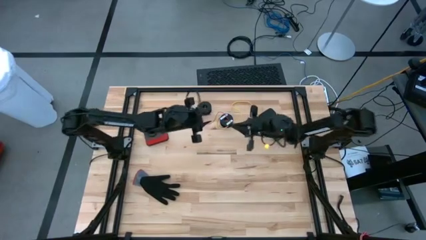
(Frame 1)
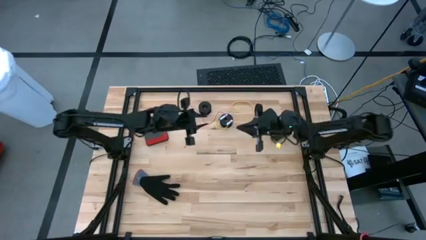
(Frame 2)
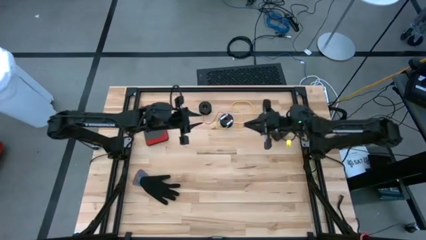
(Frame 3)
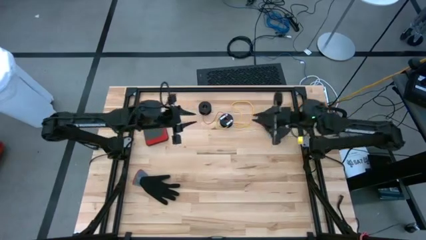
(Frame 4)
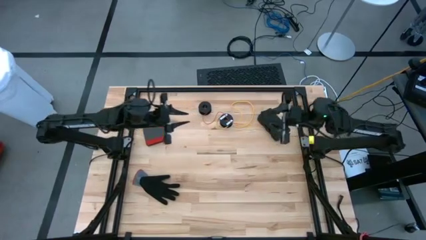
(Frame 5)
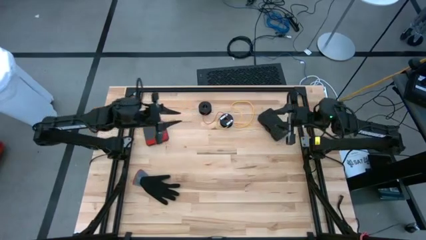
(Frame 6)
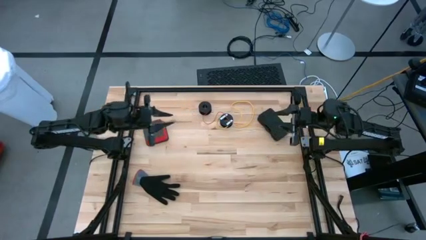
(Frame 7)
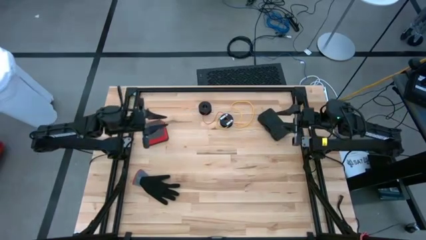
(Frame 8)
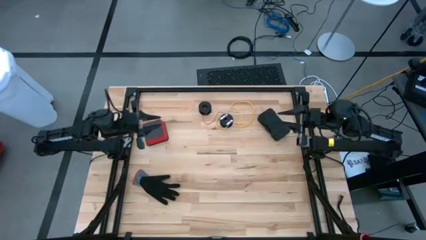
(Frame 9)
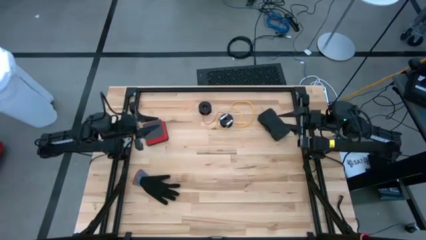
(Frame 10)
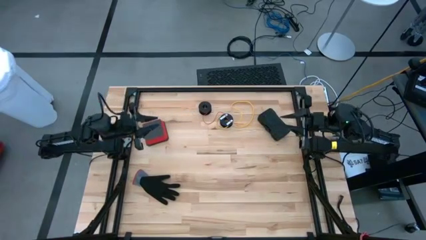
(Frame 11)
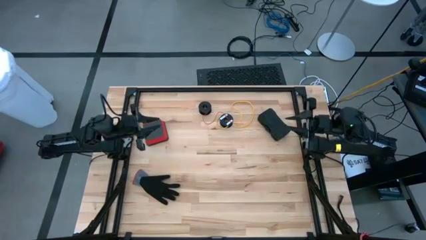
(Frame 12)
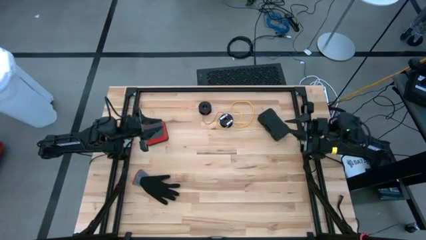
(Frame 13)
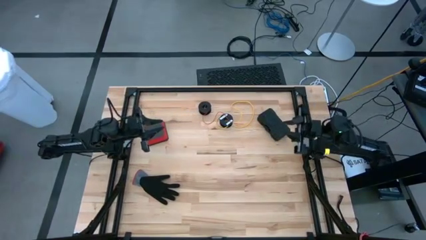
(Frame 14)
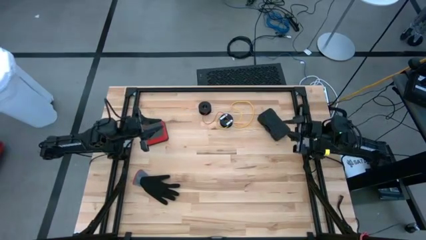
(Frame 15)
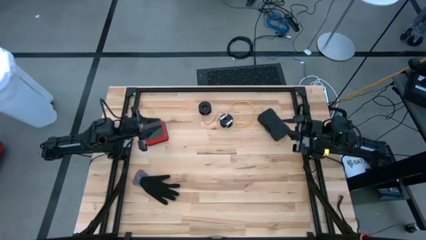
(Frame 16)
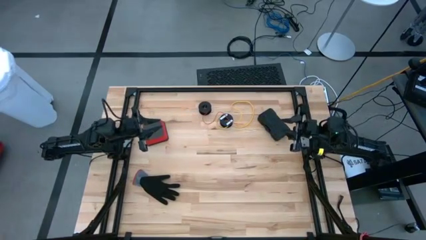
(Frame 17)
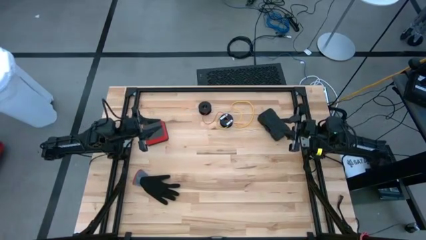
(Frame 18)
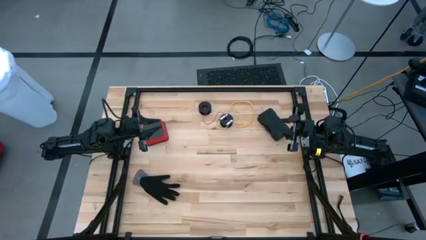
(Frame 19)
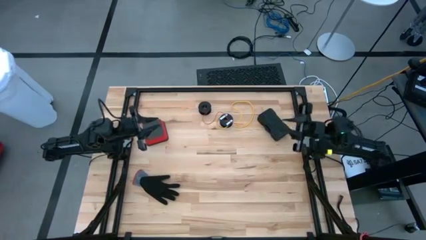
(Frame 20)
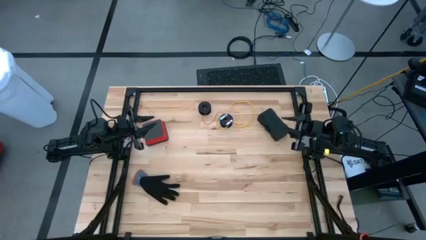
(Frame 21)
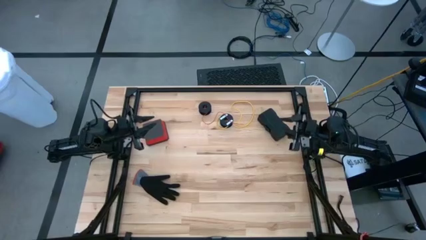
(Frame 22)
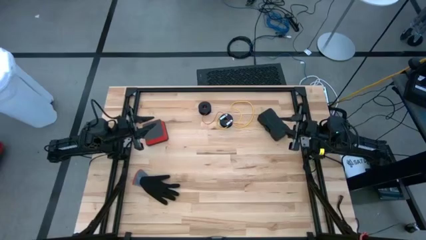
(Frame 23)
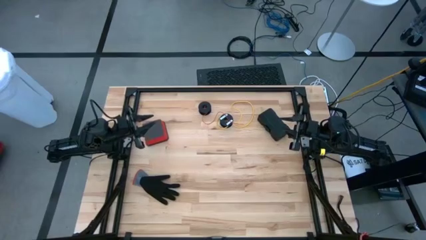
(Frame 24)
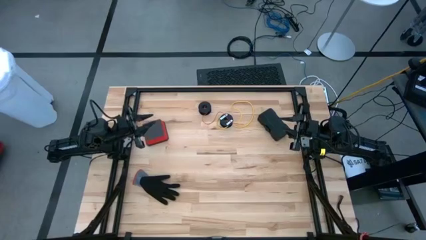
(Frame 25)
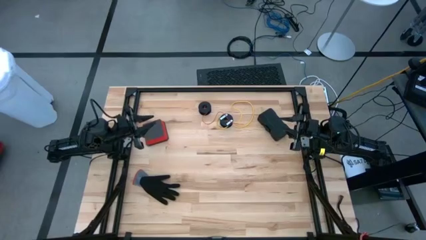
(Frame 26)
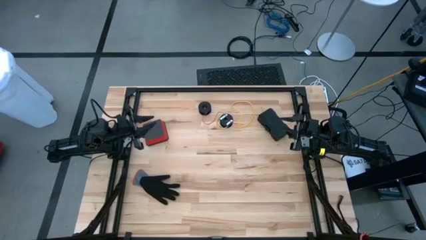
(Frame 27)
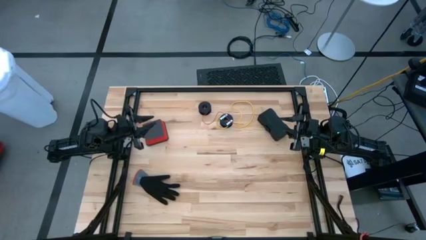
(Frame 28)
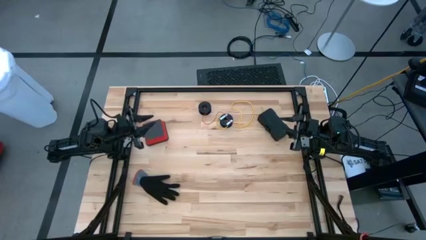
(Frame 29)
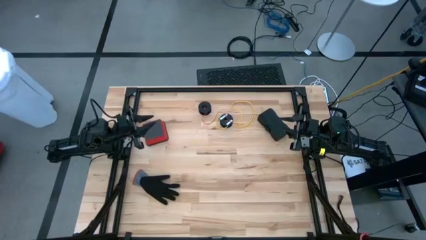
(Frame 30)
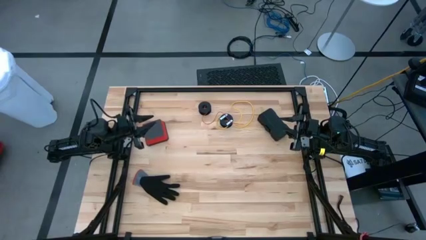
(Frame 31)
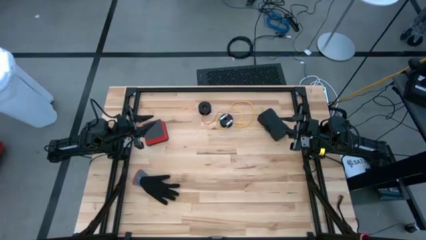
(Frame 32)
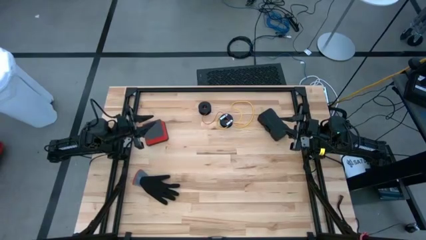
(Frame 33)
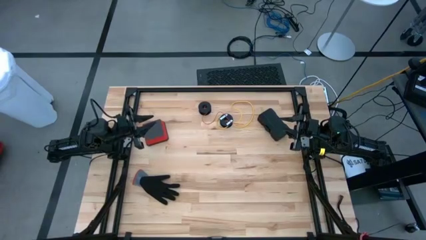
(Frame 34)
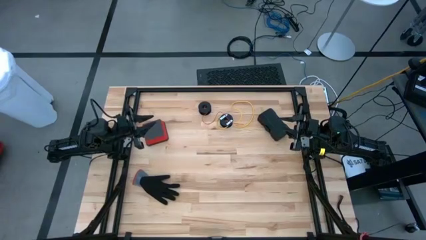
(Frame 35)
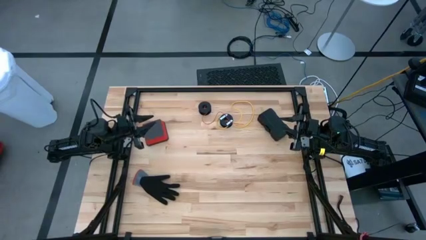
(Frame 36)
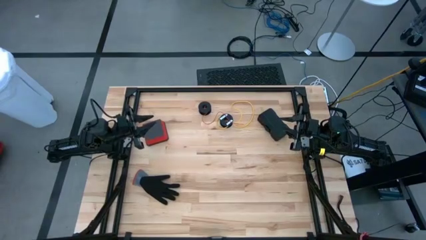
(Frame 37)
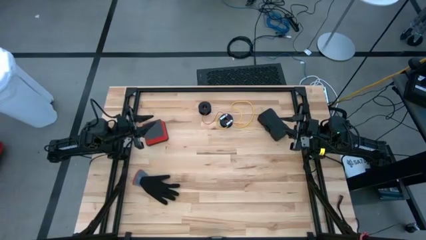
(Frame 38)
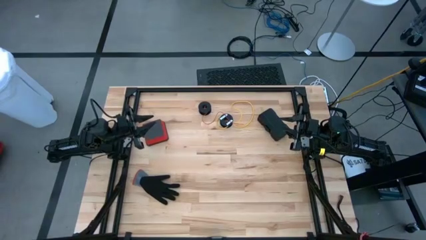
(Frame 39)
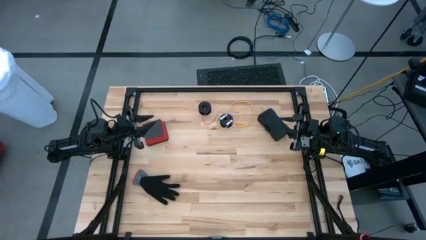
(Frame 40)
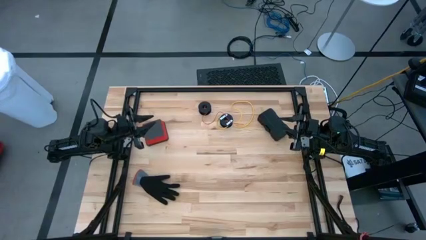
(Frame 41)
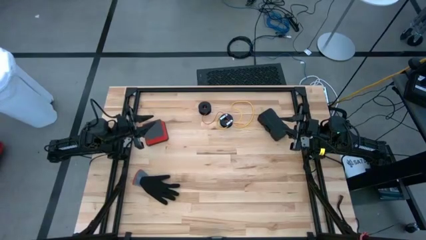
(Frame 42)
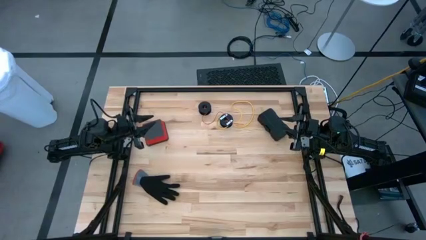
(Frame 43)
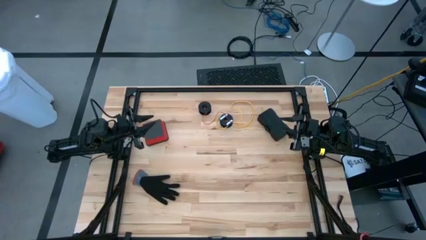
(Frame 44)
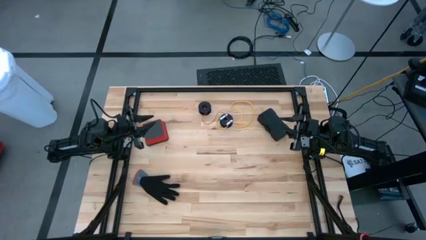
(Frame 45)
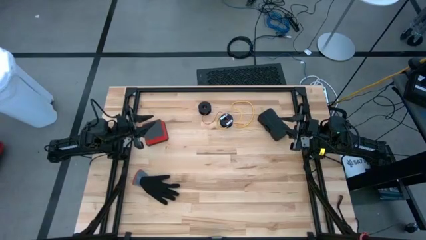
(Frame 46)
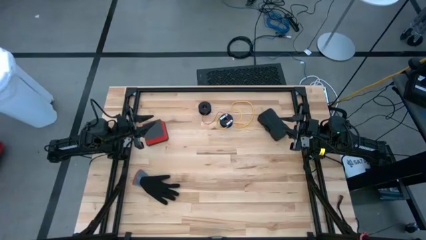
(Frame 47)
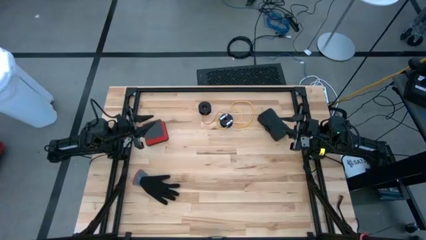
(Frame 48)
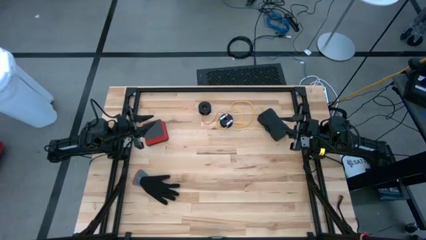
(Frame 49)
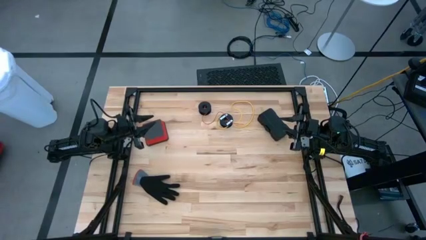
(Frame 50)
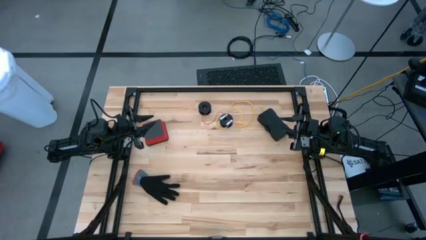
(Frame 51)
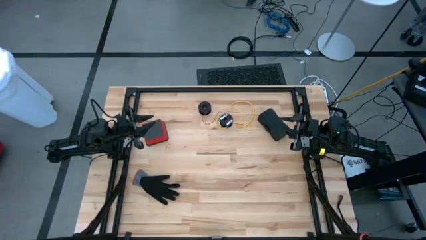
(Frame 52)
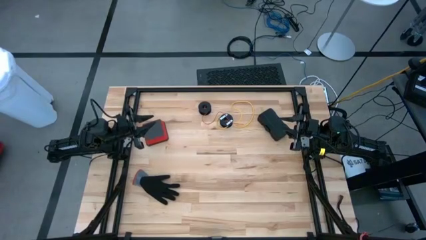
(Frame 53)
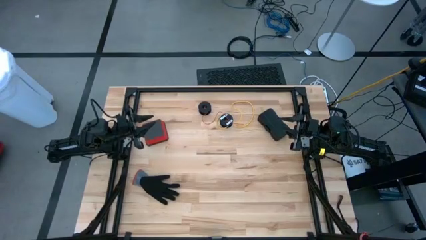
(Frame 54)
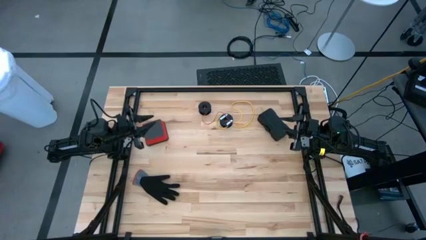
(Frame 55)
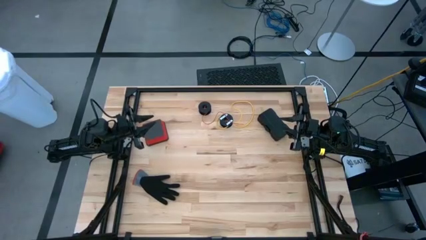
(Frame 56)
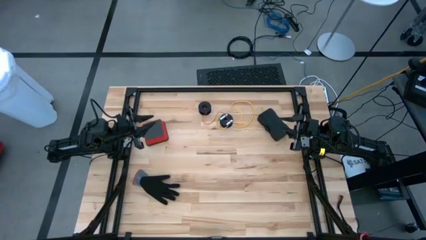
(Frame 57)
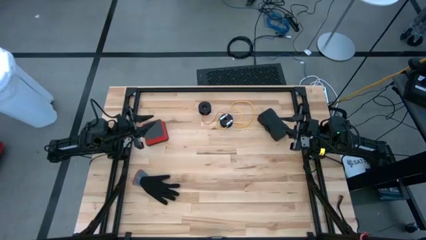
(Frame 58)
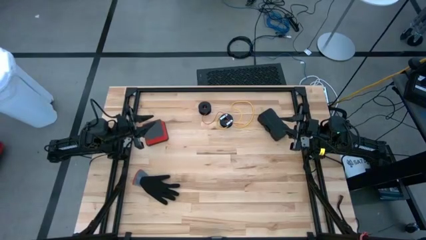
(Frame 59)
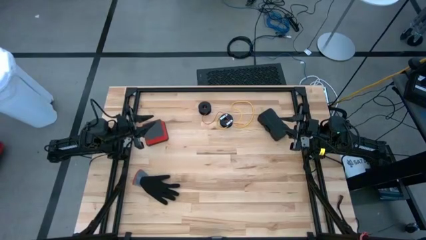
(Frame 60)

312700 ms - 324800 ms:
Task: Coil cords
Return to Home Position

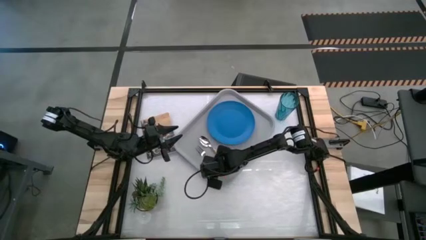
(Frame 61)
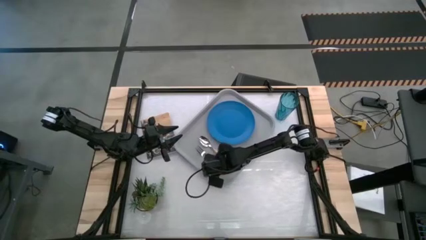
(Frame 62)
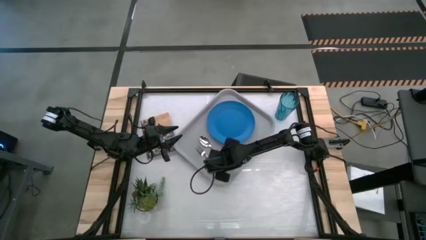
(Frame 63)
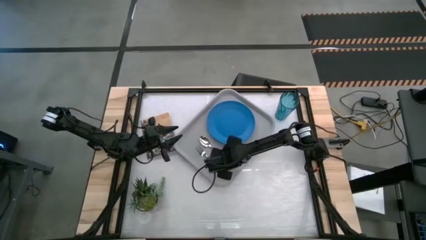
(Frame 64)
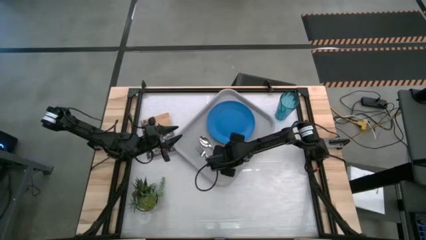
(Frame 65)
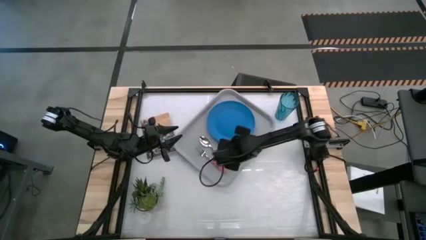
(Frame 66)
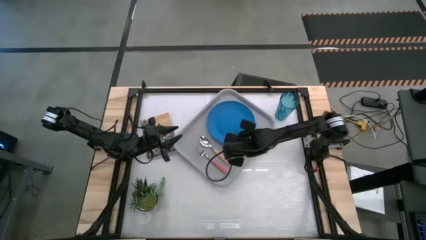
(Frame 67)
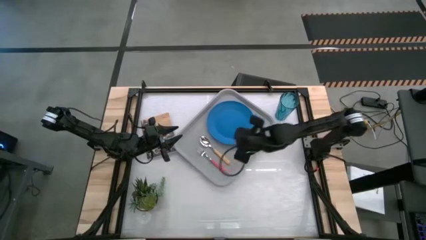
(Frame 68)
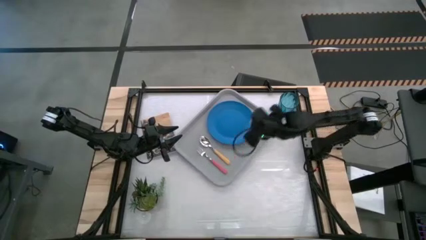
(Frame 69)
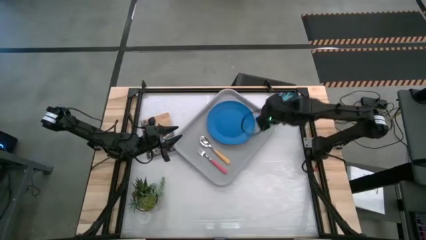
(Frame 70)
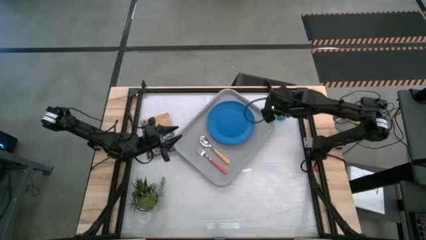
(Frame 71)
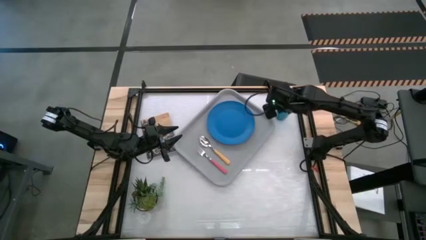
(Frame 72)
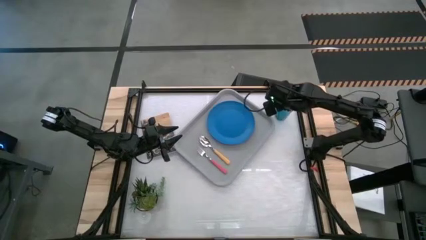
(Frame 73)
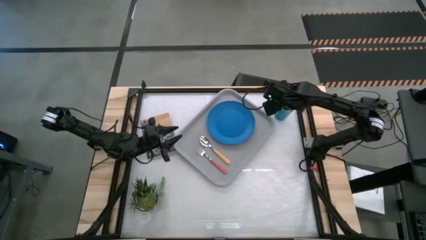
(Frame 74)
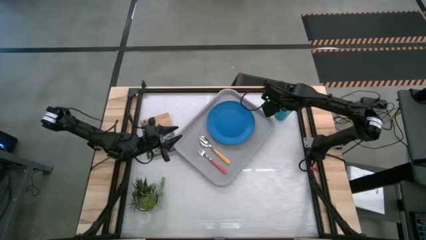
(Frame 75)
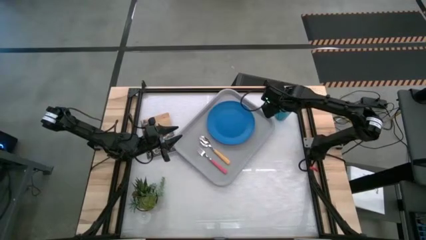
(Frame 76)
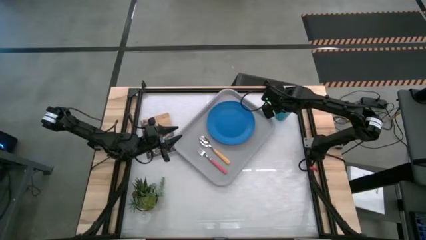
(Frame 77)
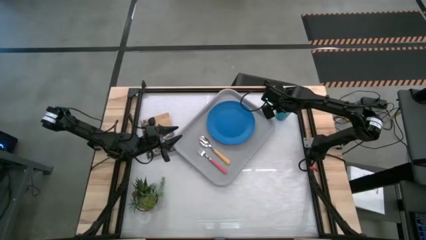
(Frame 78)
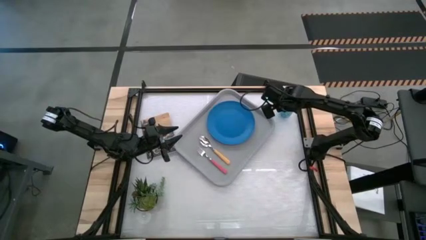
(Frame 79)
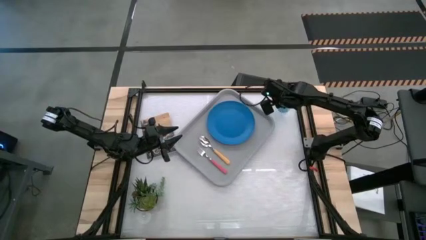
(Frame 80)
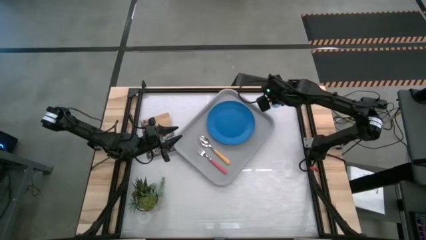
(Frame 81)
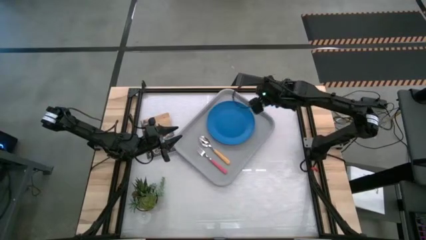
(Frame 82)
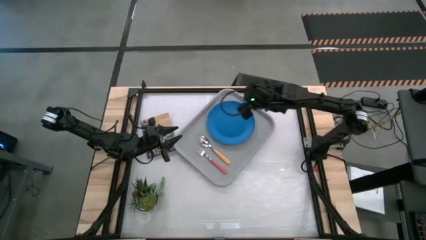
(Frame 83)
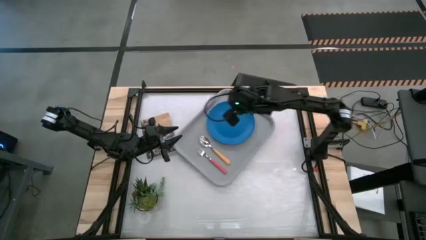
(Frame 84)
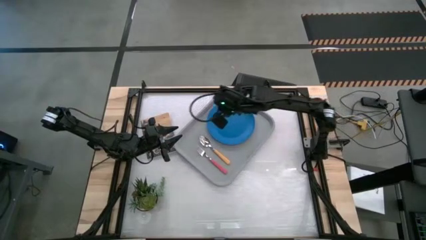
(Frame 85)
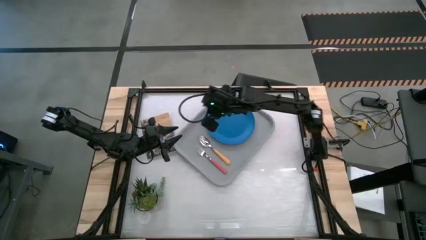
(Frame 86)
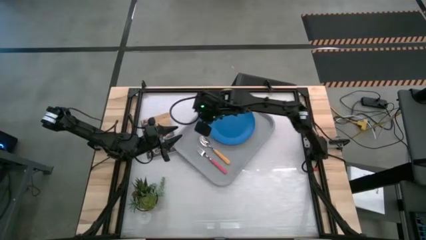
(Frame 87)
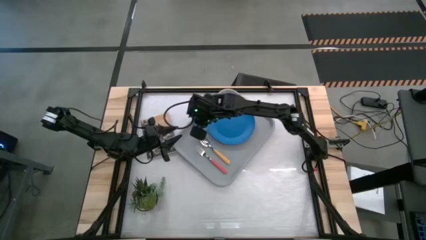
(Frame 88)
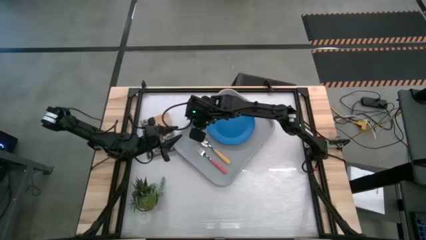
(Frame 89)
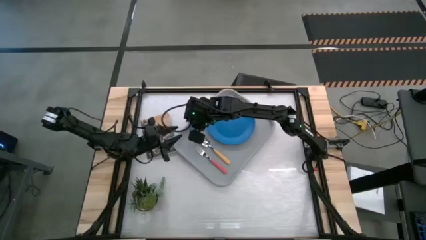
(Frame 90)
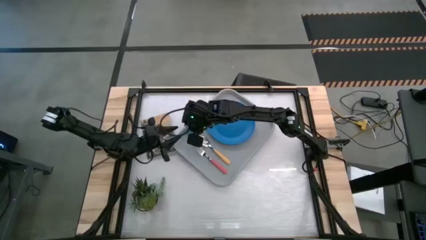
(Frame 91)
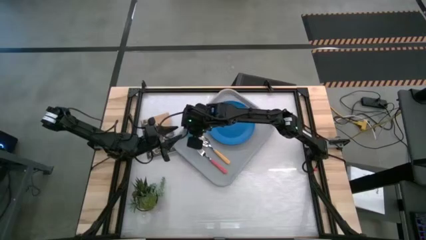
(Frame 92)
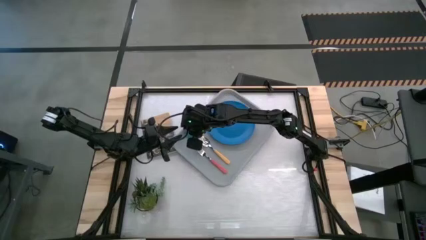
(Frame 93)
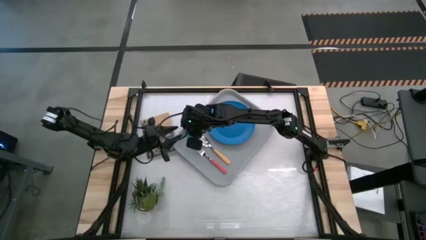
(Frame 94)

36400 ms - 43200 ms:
Task: Pick and place plate/cup/fork/spoon on tray
Put the blue cup on the gray serving tray to the left of the blue plate
